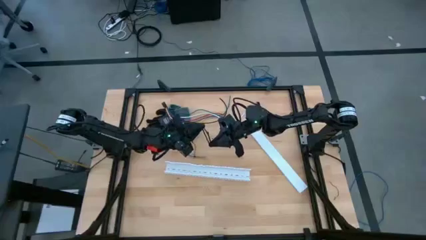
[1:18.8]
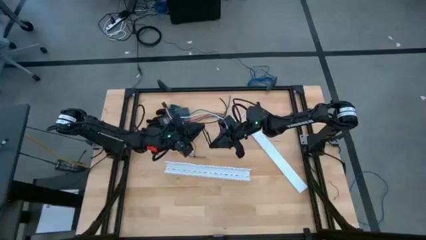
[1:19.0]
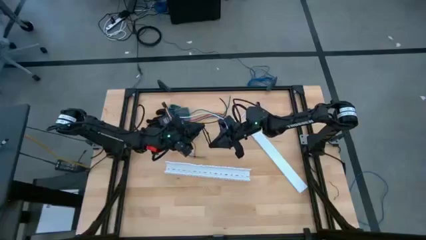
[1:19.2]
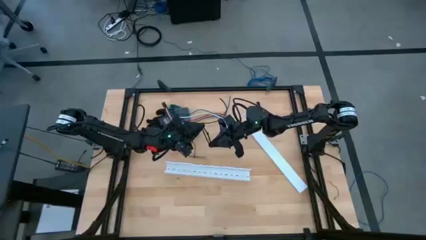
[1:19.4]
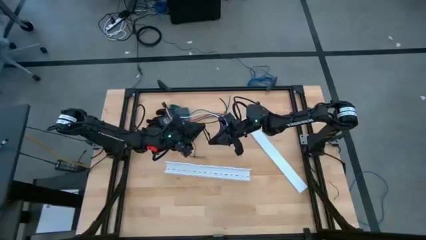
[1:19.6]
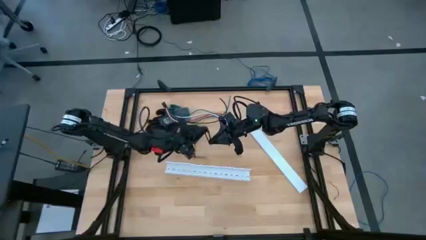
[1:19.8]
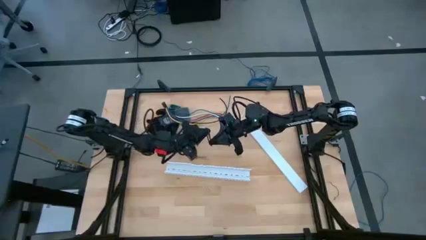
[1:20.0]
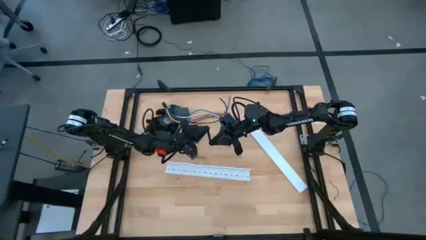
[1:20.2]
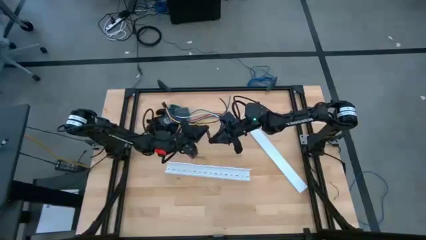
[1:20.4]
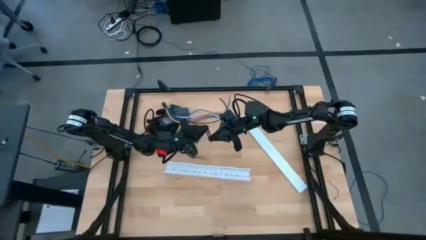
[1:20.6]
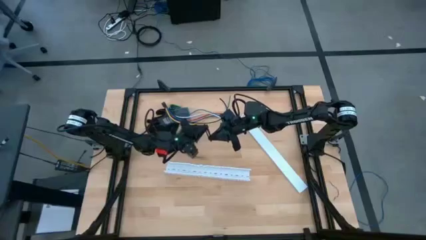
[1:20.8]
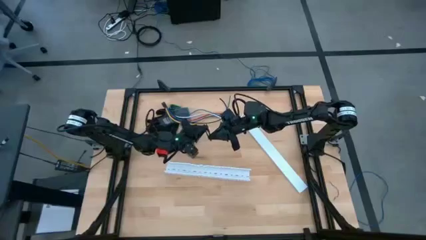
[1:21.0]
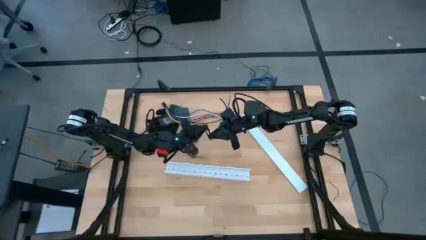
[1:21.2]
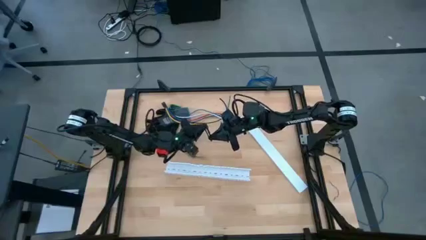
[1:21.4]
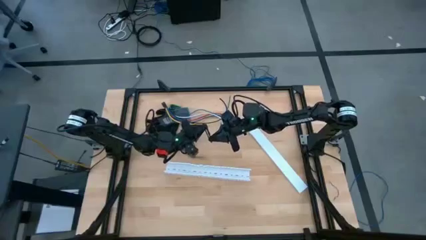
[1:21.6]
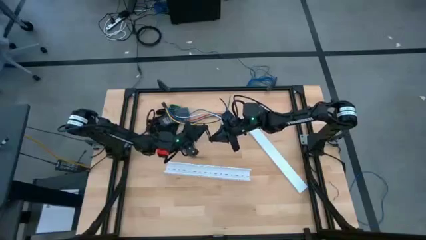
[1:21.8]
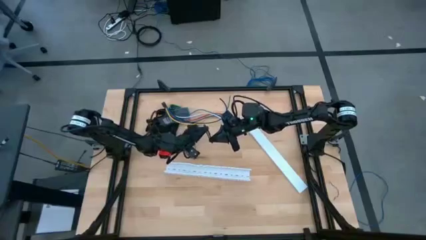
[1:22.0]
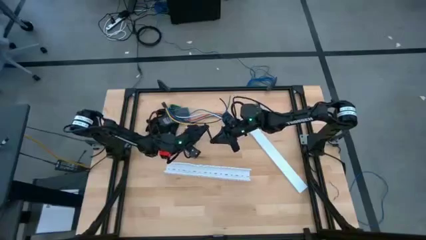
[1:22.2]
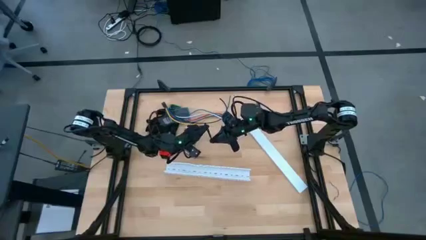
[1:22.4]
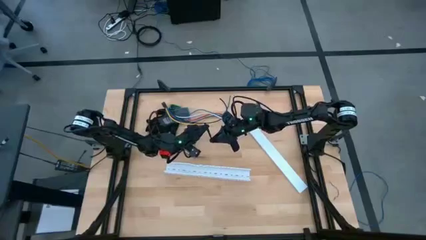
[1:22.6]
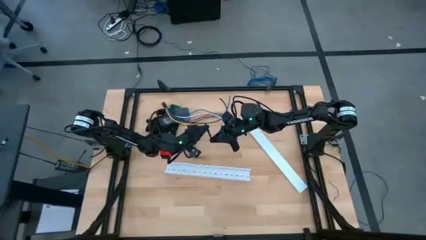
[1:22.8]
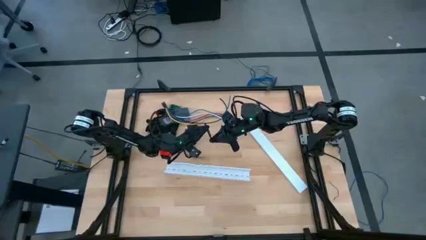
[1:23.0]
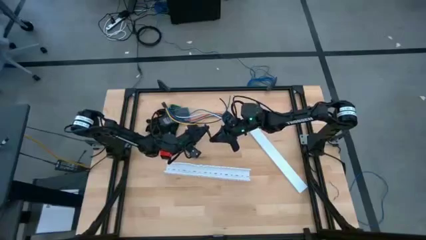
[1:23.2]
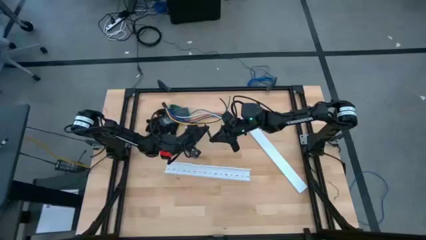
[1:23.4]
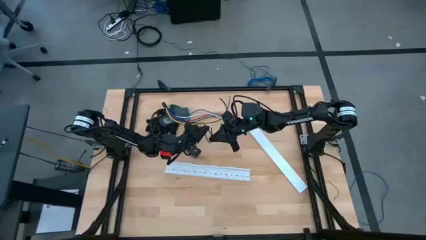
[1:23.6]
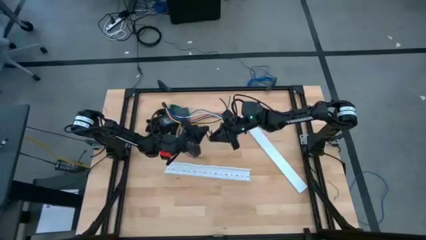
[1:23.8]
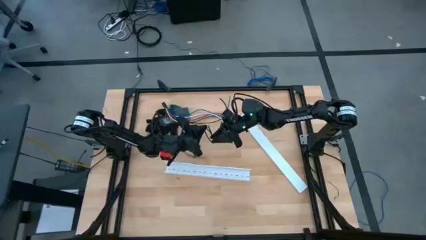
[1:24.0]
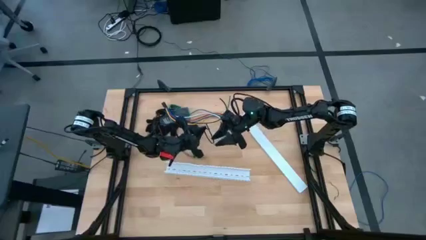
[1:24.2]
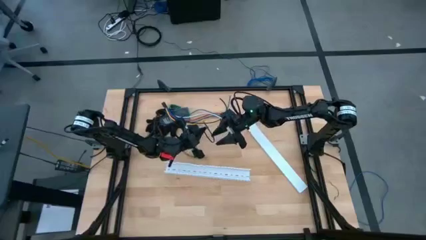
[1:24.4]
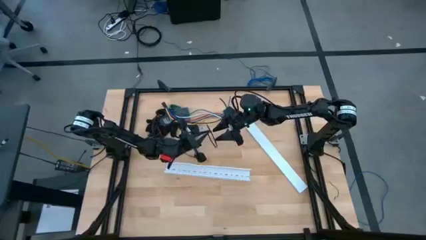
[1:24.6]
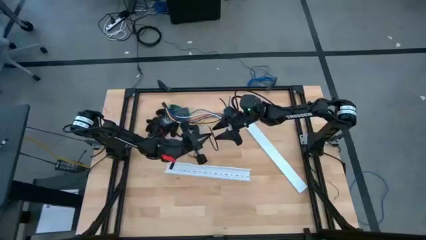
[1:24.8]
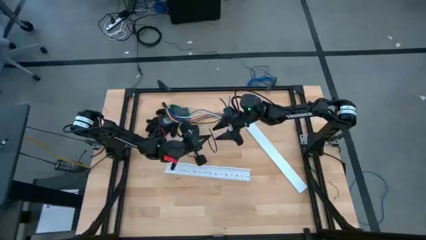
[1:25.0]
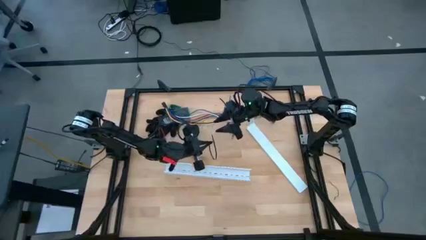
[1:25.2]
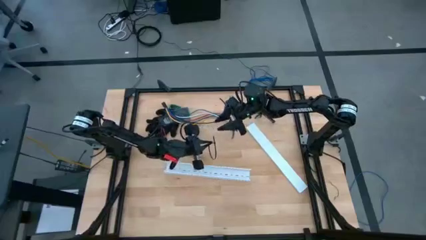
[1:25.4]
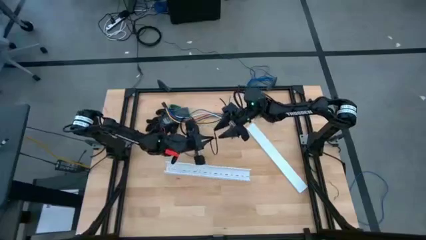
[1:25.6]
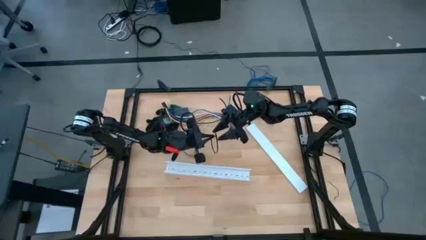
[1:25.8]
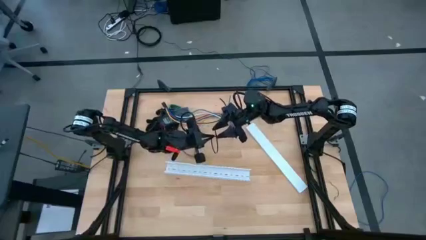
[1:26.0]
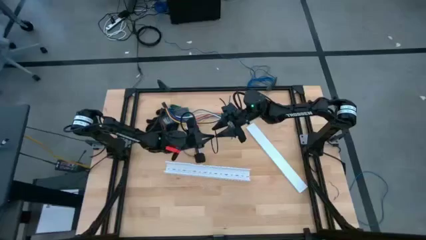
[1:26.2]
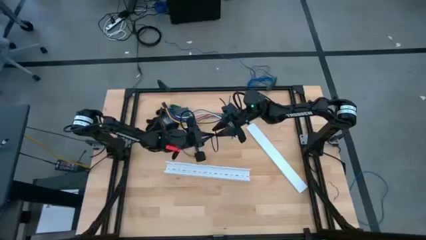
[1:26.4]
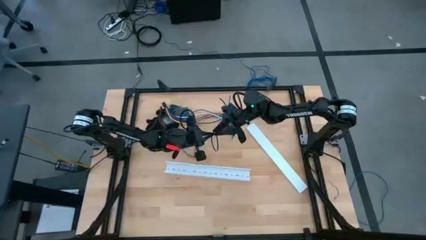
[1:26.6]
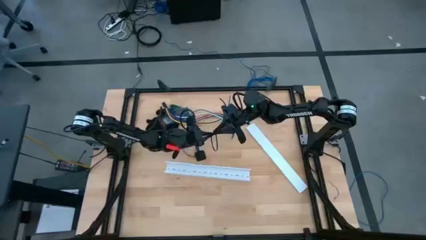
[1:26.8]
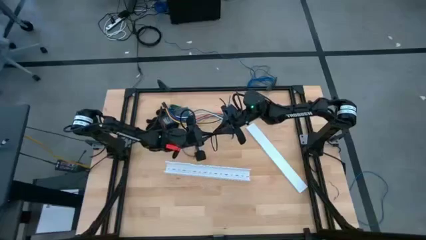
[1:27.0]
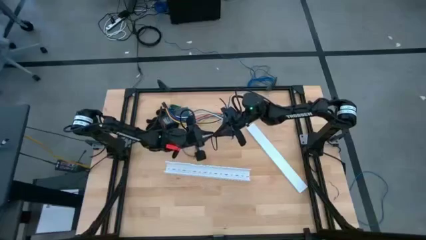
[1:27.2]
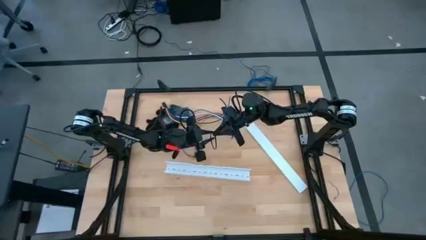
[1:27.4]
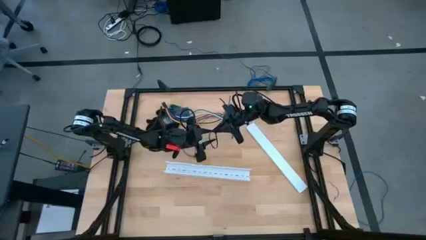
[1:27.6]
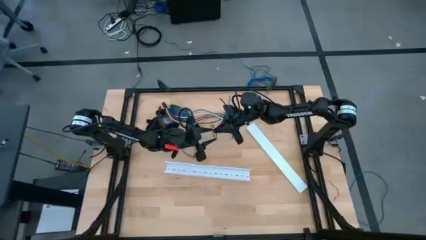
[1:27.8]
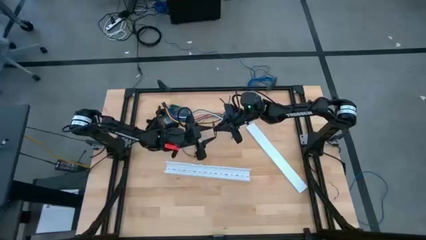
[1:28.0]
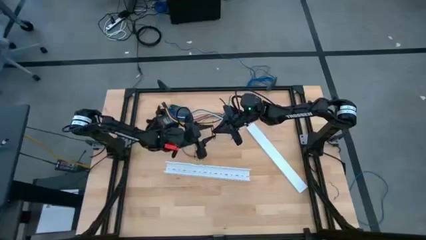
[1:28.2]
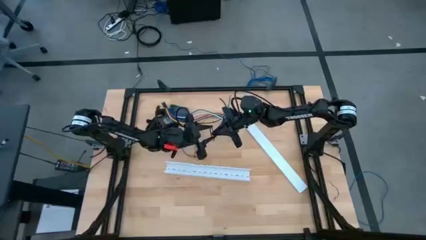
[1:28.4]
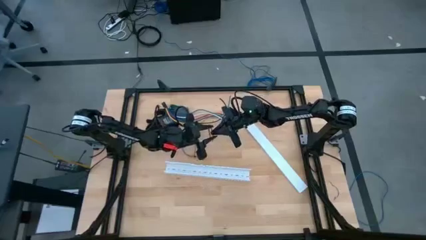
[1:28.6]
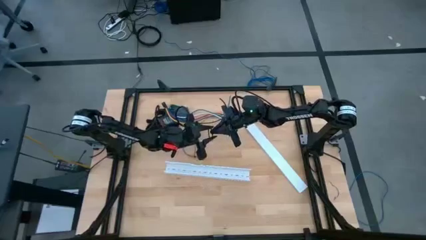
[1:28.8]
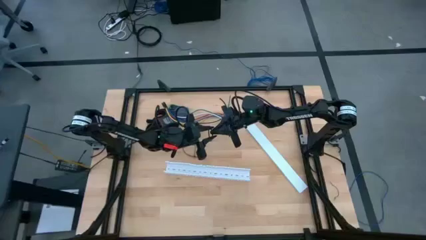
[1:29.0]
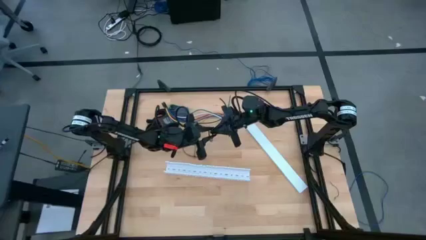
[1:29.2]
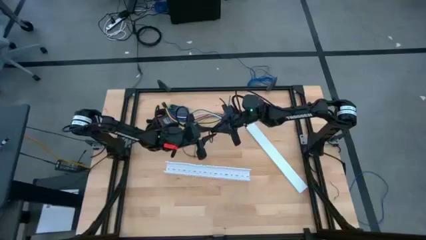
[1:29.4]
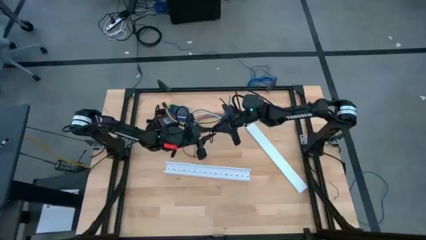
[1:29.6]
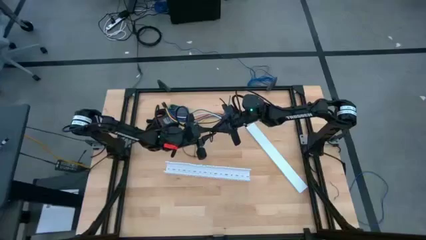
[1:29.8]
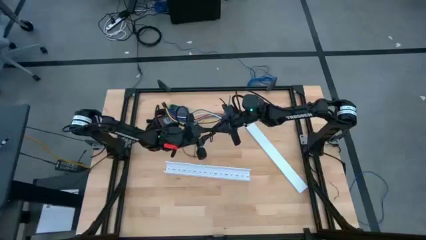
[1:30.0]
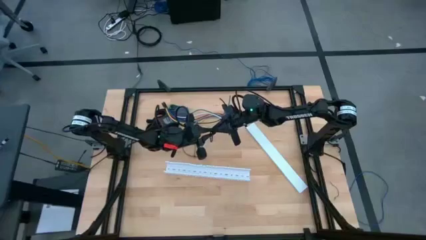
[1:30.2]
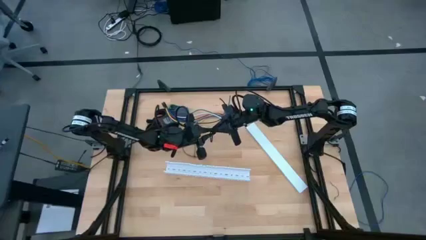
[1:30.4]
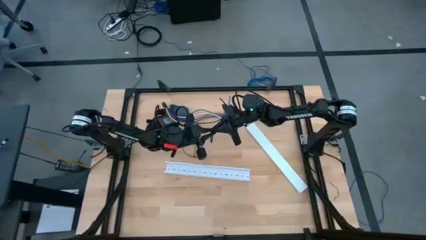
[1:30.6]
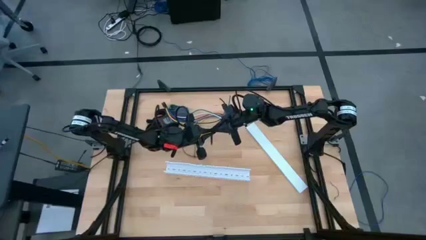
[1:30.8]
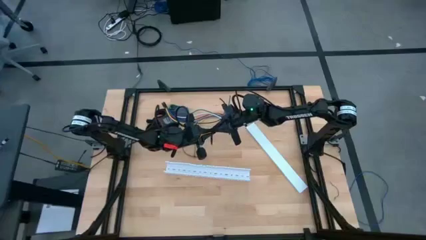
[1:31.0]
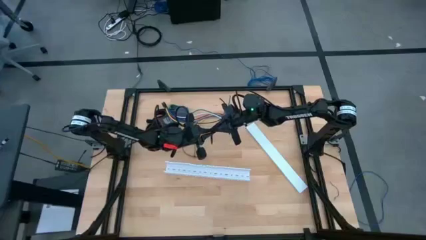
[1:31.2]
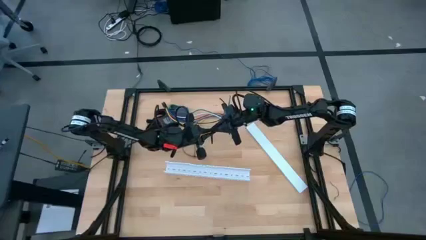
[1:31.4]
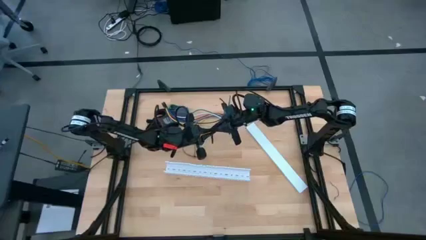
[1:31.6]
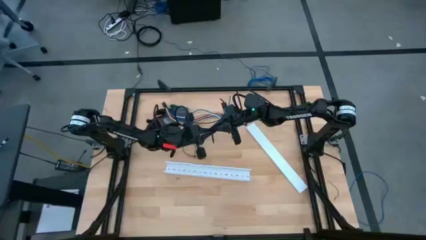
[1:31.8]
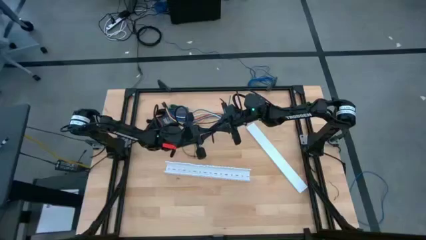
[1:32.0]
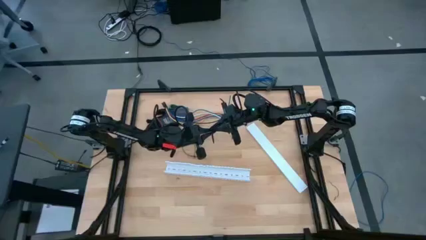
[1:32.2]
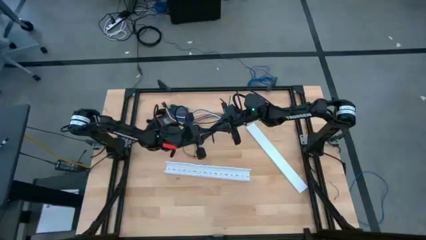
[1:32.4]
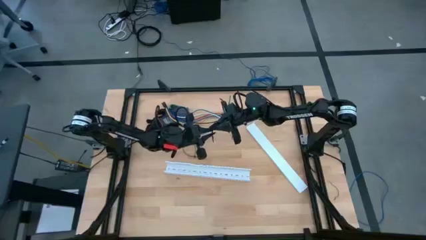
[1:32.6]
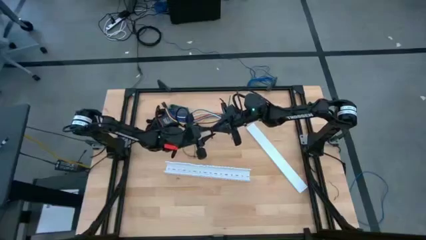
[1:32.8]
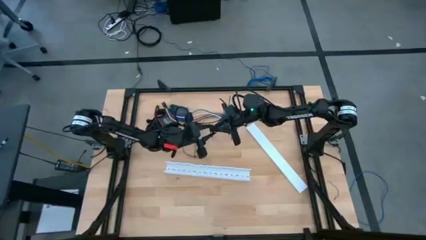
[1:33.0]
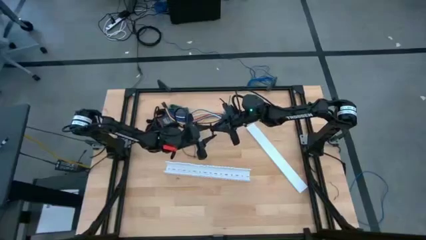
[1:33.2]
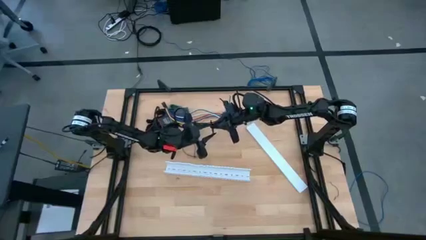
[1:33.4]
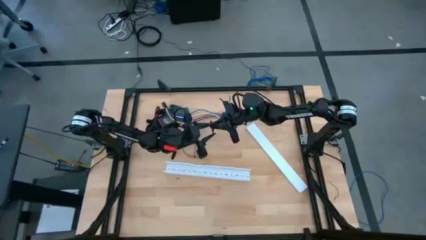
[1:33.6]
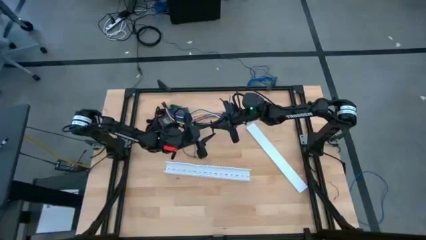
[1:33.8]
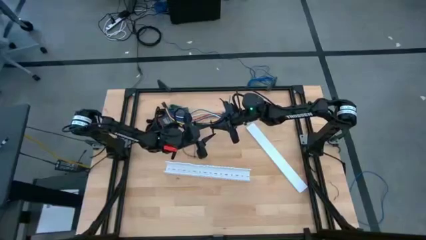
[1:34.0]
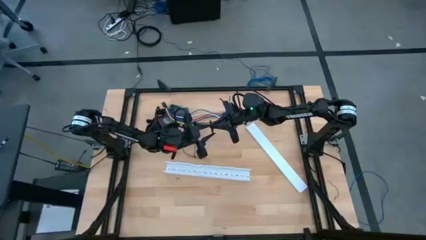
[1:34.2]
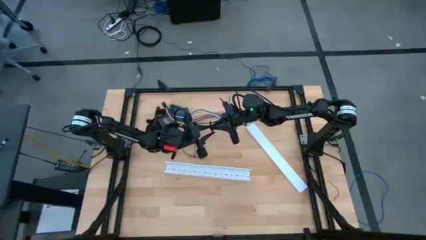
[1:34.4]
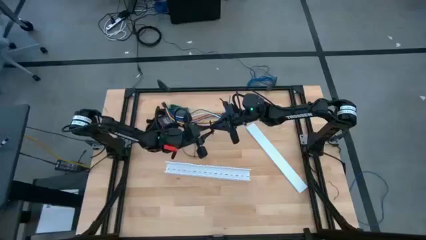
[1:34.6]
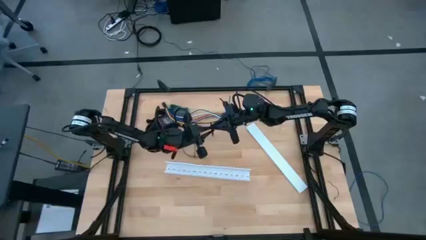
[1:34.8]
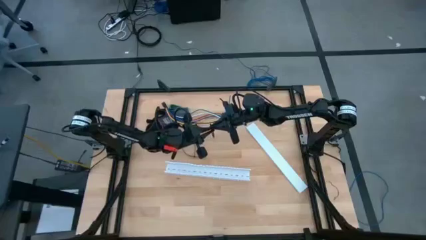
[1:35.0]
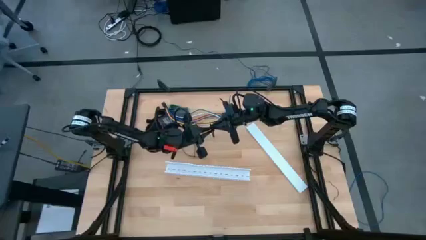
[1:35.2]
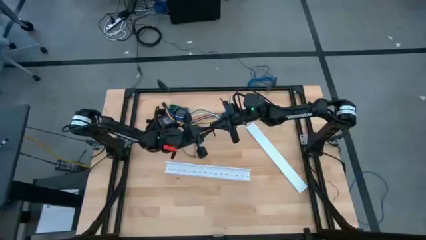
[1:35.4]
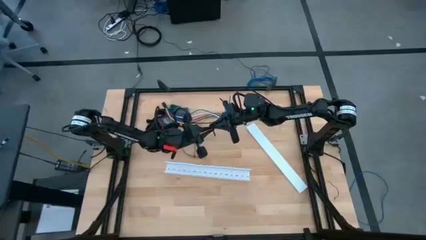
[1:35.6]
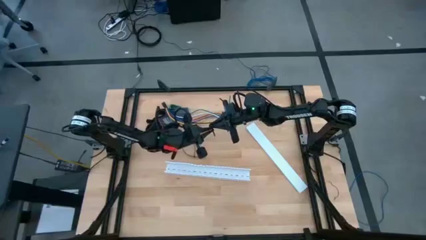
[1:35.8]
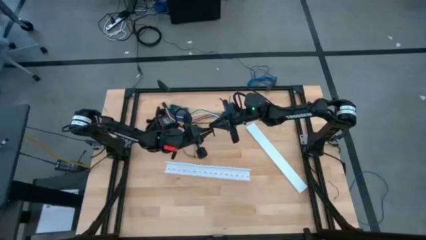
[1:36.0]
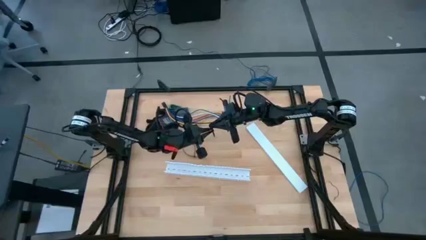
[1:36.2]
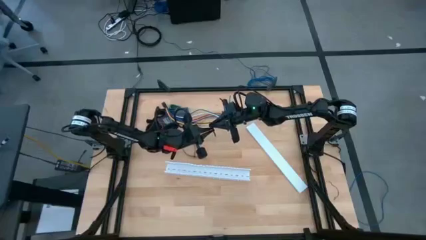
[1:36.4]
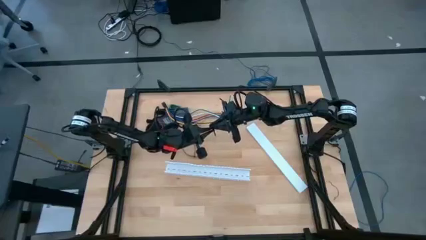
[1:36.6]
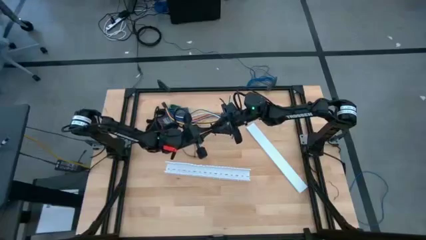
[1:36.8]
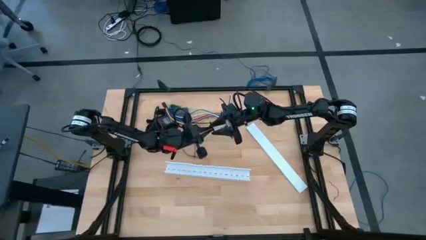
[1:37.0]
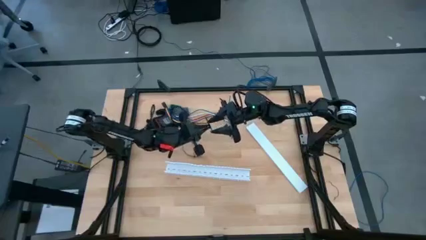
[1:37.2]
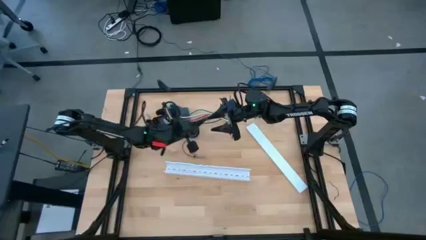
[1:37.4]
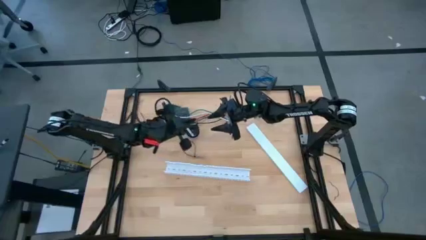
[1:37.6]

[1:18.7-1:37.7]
Task: Ziptie cables
Wrap the cable wires with the black zip tie
